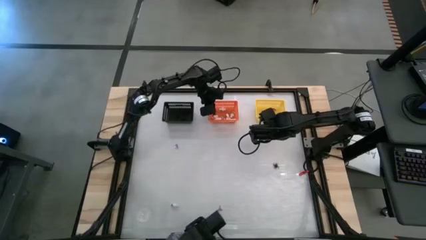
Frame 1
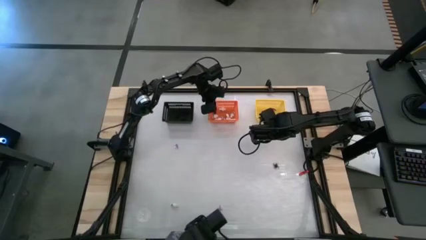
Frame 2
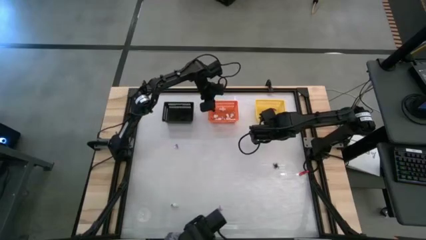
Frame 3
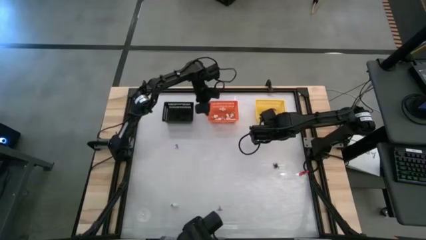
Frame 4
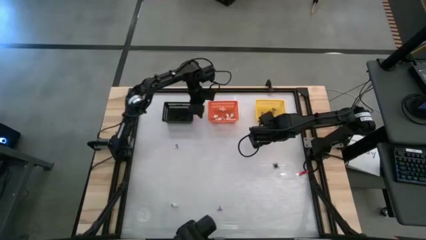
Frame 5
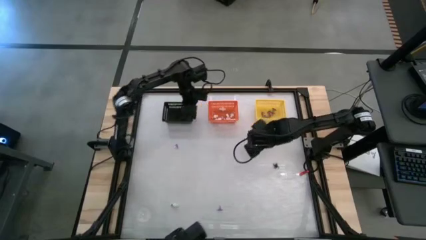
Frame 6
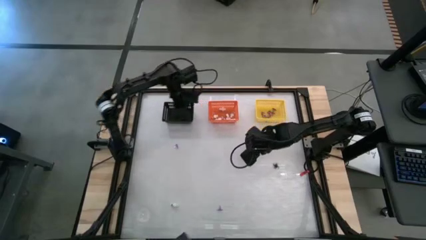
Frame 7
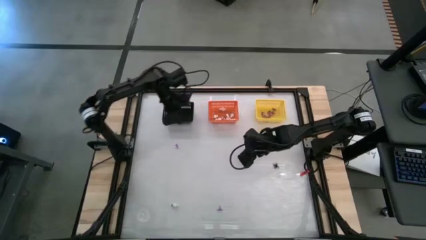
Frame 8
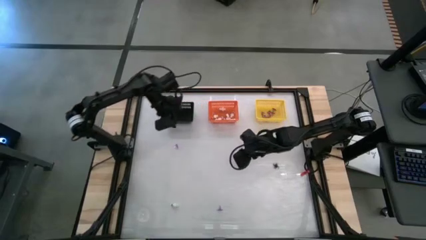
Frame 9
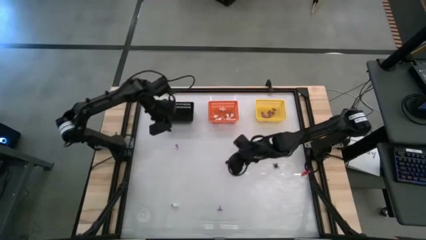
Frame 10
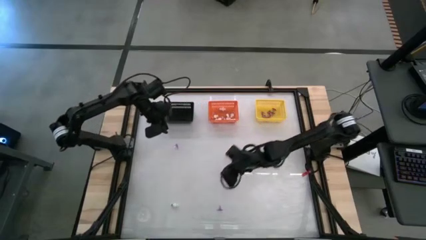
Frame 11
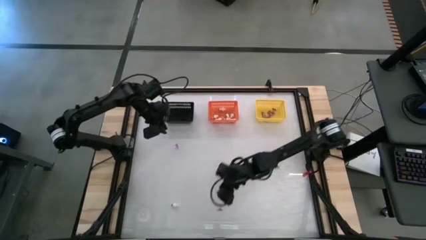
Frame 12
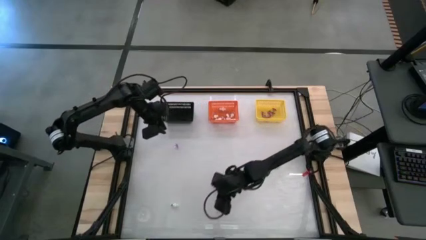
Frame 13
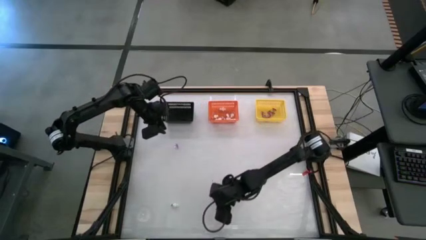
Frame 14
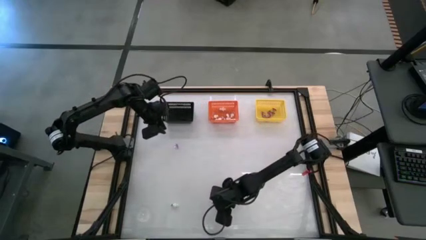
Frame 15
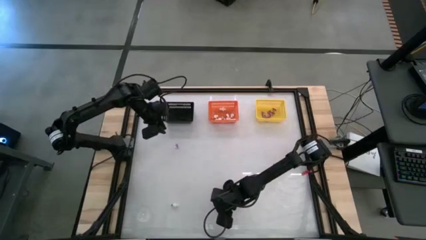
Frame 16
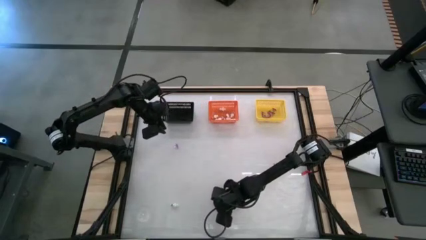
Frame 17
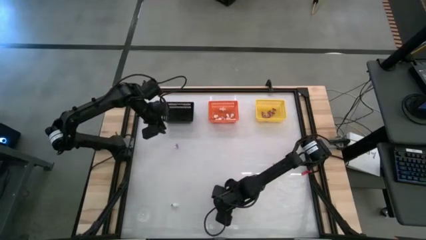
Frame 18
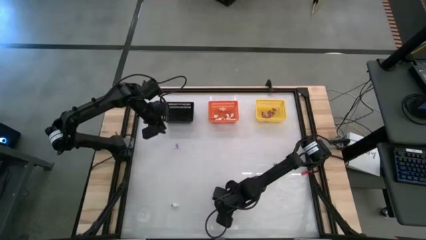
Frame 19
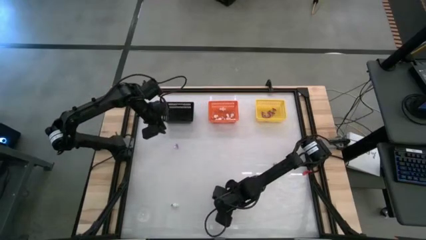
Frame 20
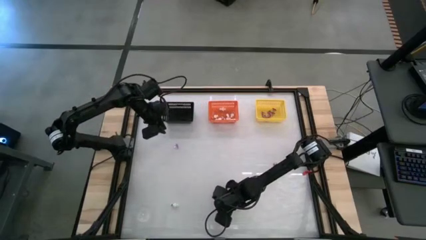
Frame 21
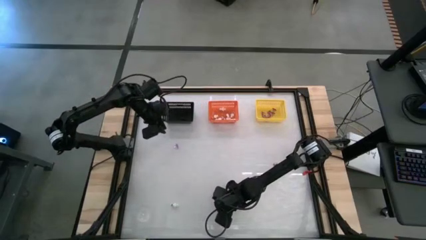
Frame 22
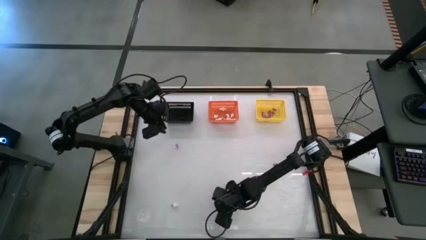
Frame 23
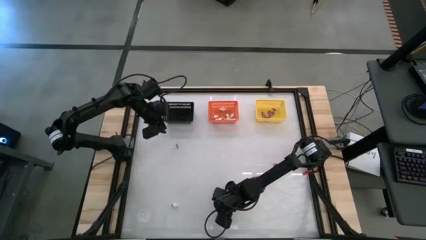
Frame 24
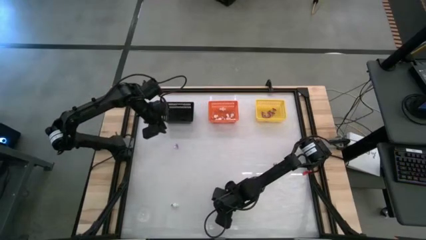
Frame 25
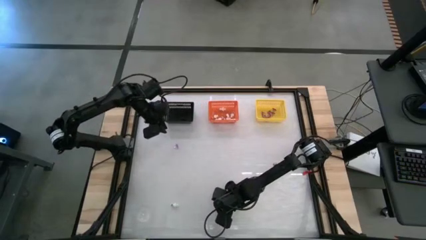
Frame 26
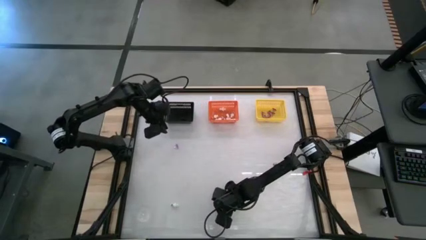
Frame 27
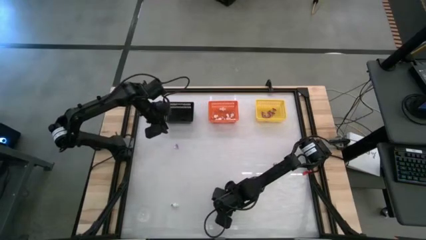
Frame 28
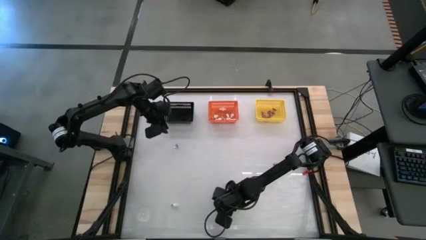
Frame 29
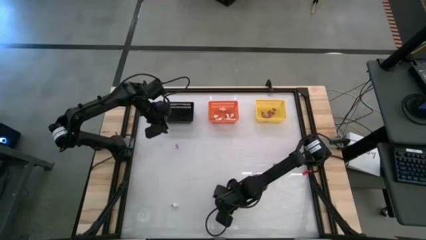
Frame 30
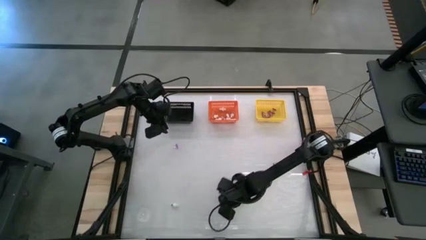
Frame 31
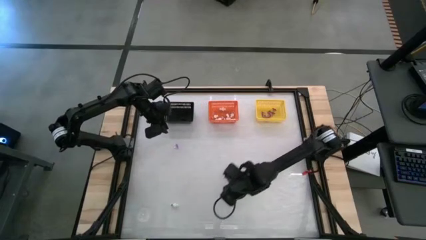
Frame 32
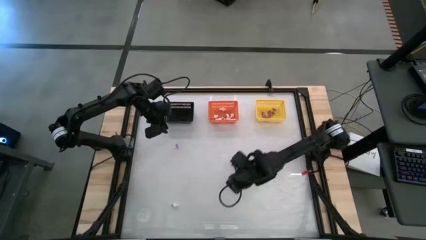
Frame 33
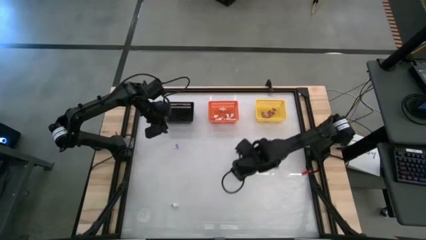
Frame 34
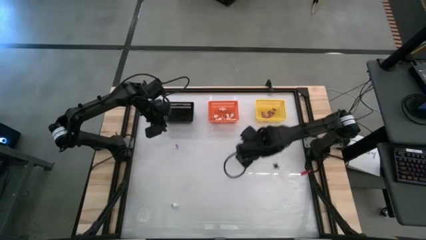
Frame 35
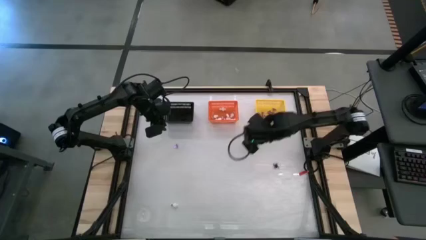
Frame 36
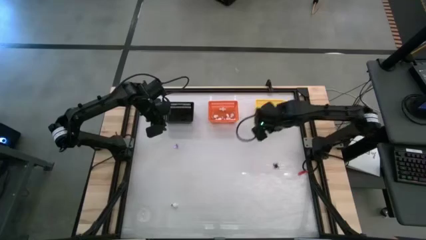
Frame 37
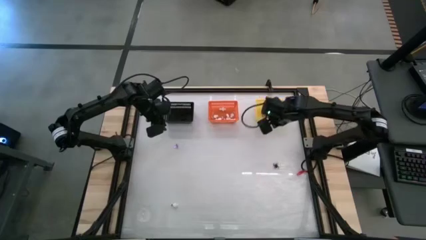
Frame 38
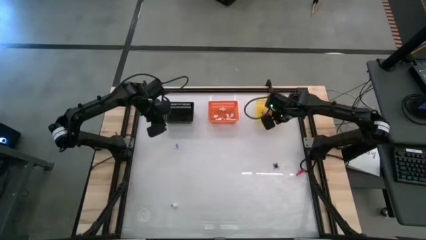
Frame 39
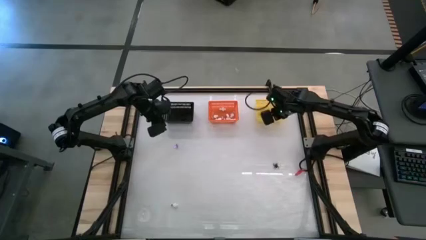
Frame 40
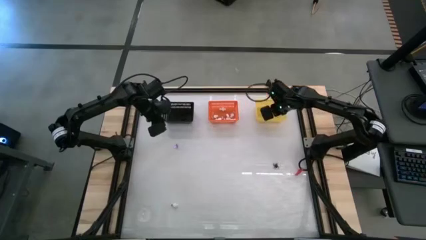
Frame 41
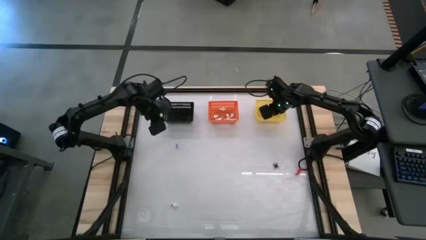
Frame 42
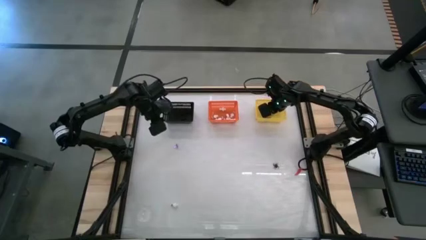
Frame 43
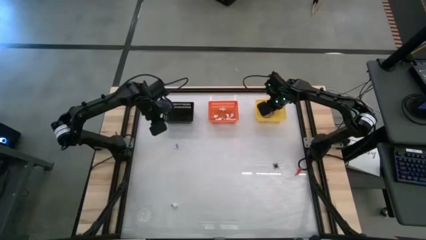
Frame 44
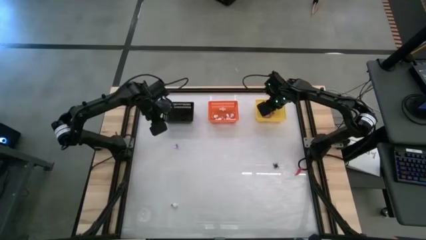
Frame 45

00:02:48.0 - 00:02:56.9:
Task: Sort Halloween decoration
Put the bottom witch hat toy into the yellow bin

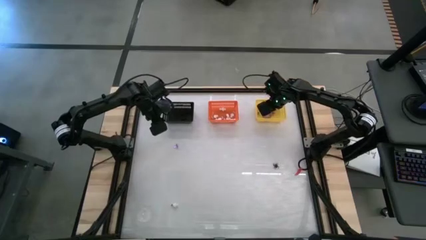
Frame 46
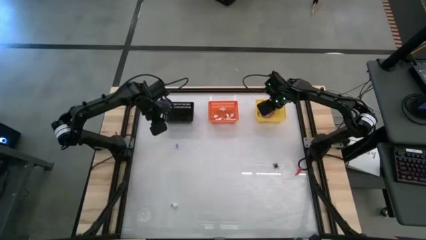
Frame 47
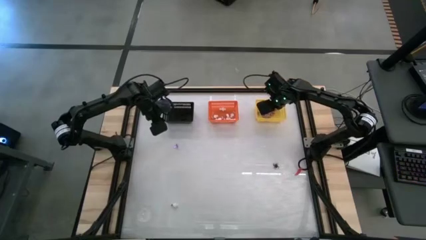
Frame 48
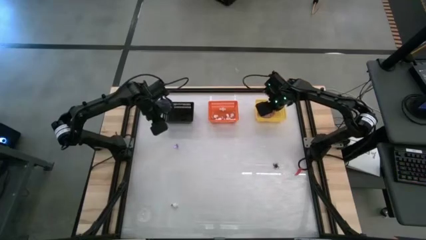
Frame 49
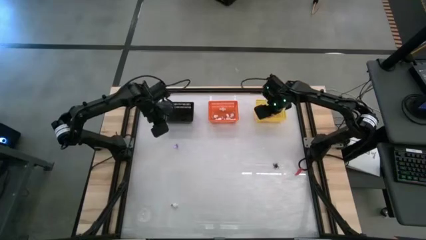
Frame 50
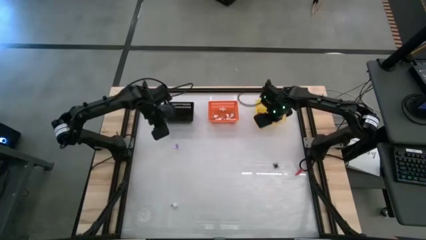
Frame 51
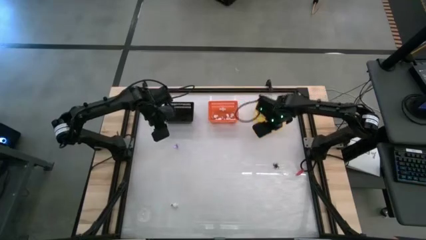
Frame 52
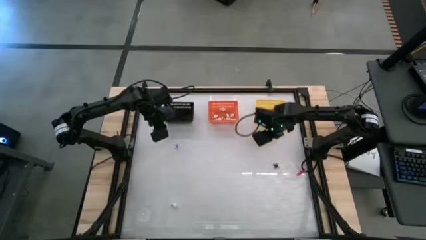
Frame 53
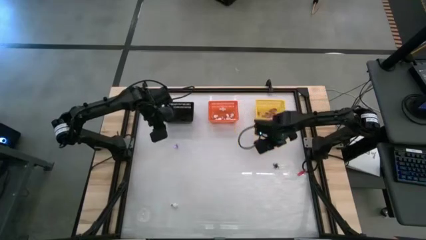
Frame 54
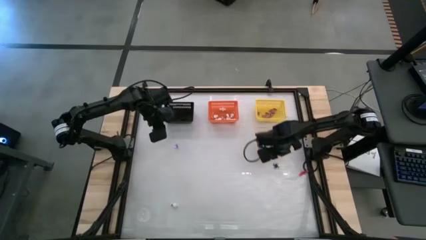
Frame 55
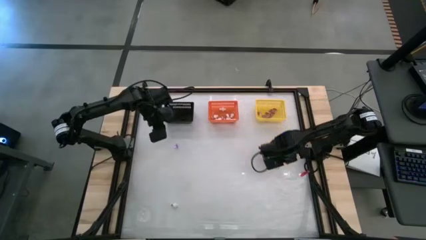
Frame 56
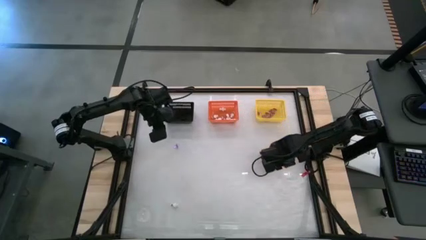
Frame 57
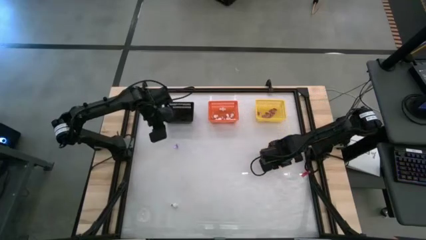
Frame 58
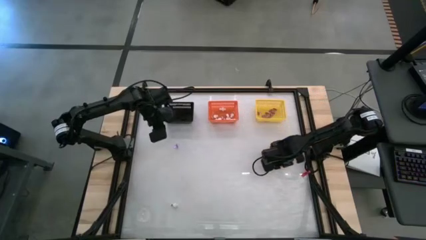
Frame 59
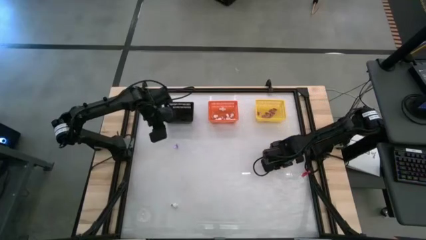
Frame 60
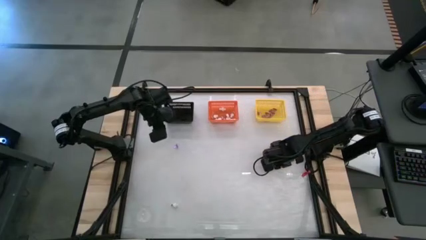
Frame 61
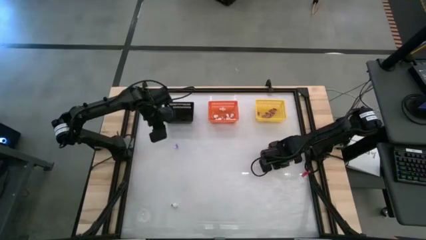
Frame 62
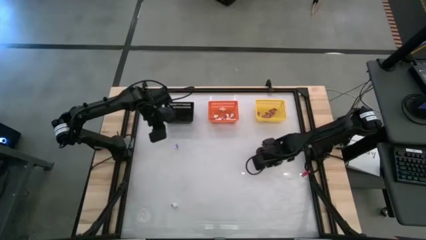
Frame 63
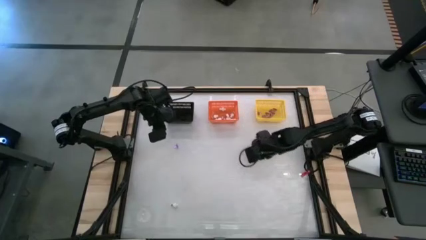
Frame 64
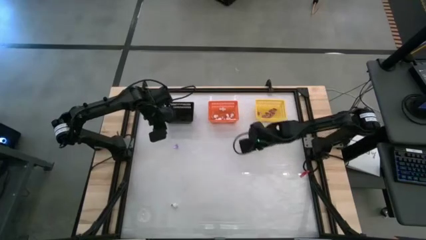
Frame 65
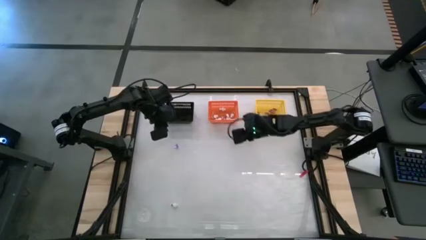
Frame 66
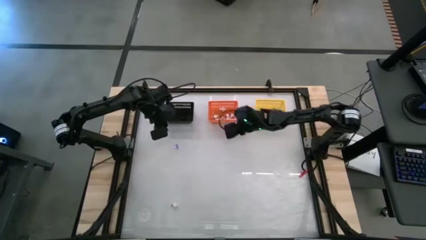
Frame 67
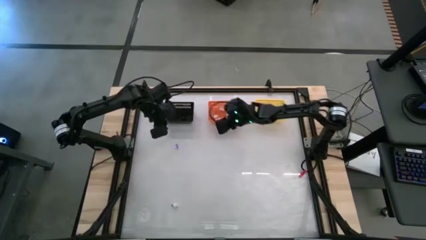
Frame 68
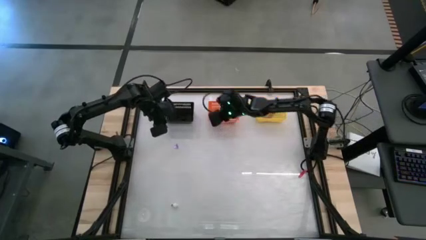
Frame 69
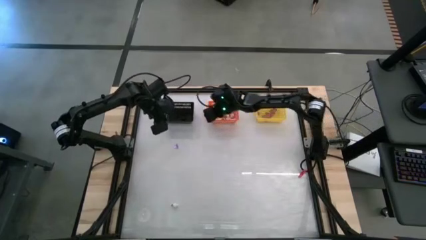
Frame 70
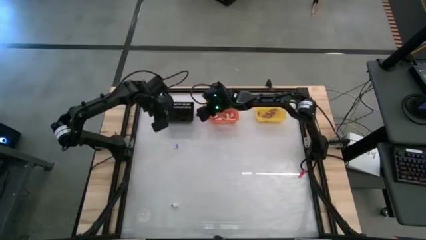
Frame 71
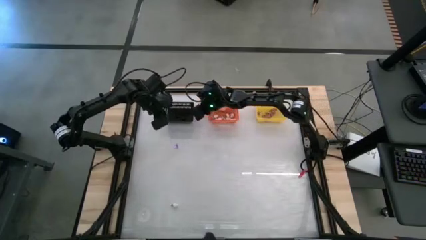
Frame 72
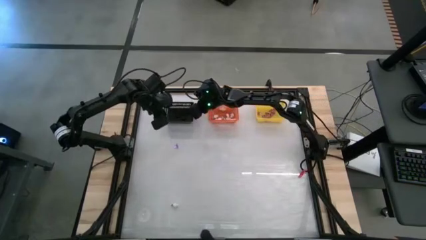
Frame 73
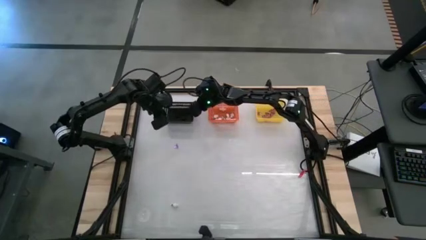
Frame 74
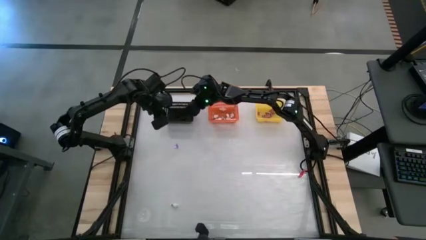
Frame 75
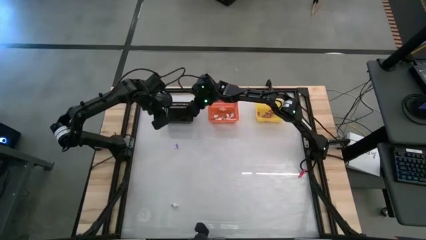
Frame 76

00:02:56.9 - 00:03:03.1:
Put the spider toy into the black bin
